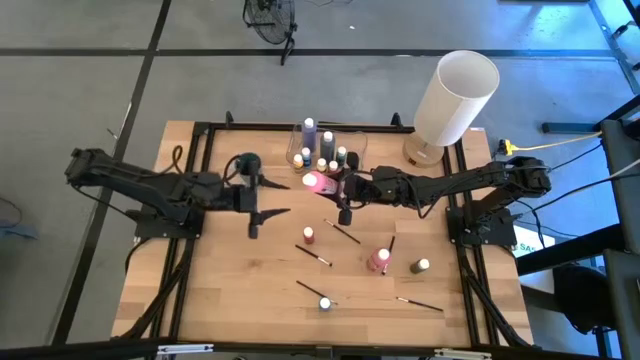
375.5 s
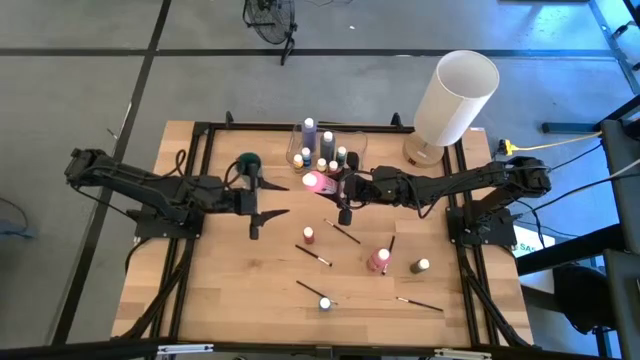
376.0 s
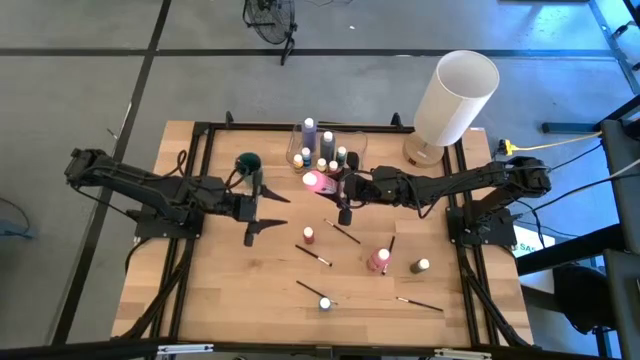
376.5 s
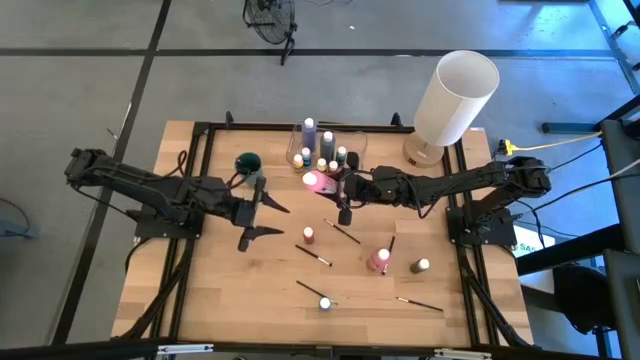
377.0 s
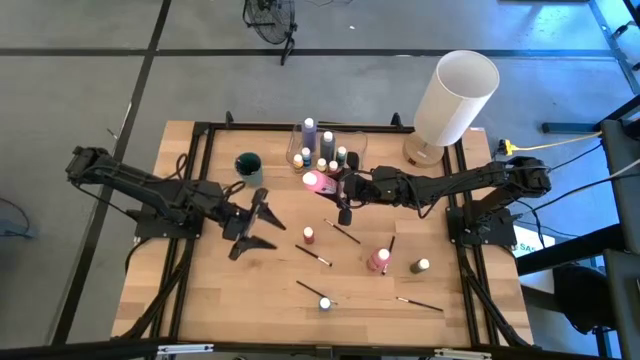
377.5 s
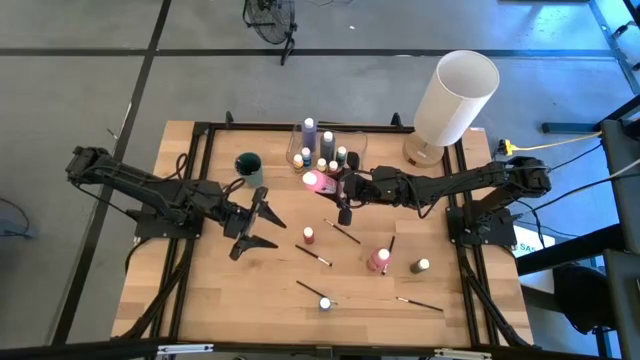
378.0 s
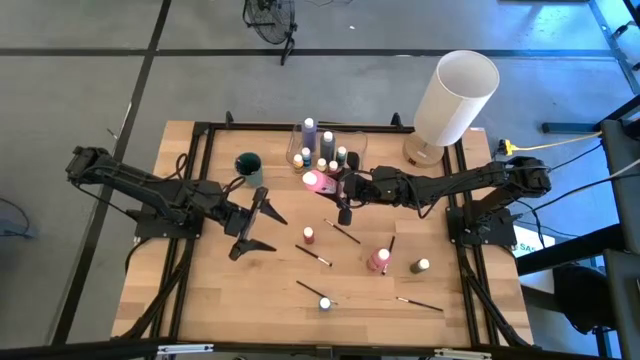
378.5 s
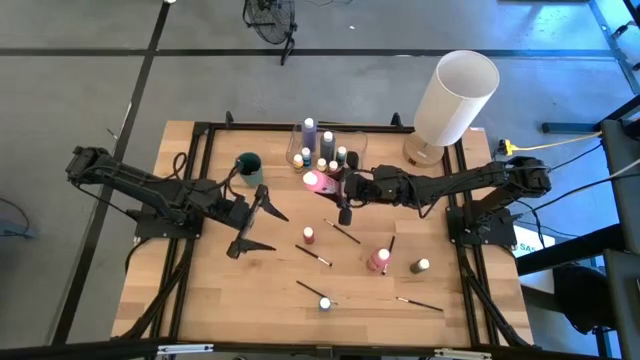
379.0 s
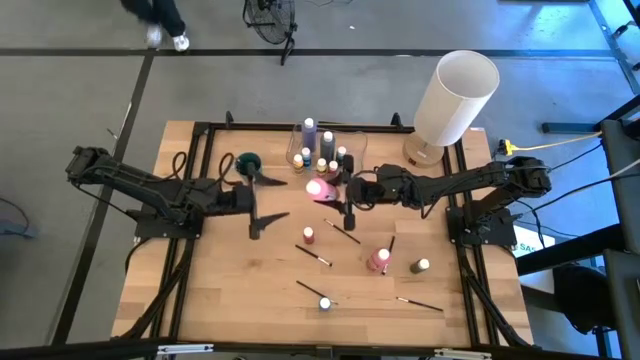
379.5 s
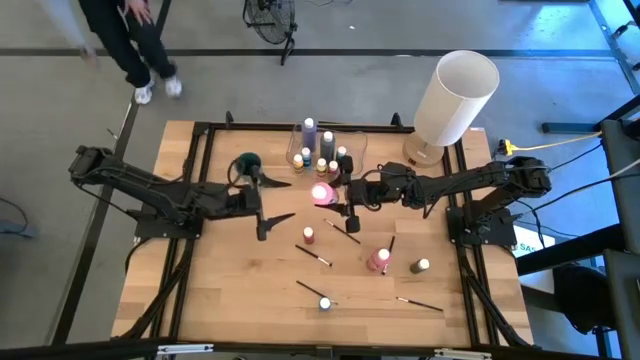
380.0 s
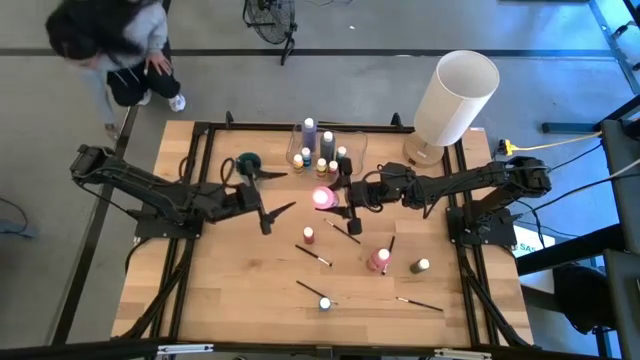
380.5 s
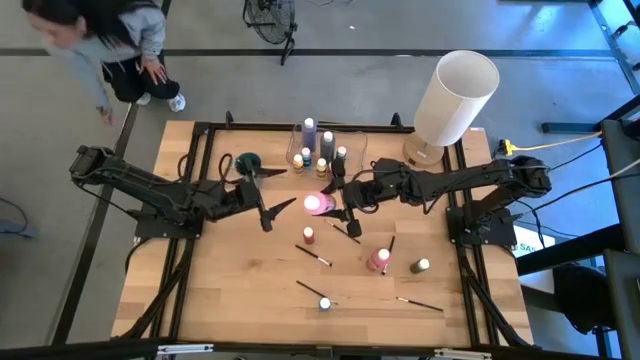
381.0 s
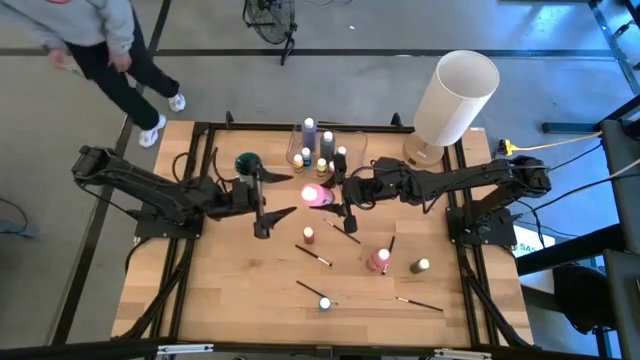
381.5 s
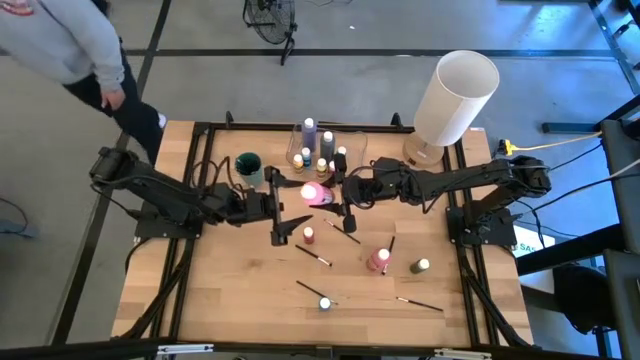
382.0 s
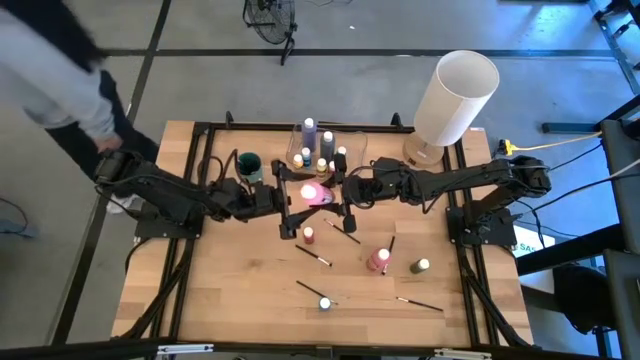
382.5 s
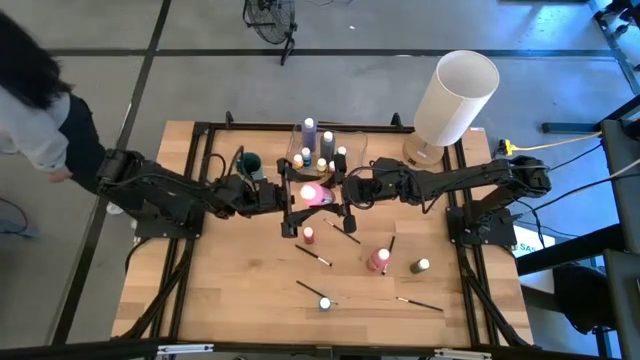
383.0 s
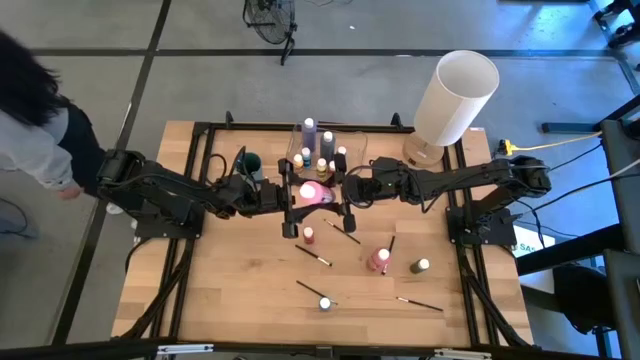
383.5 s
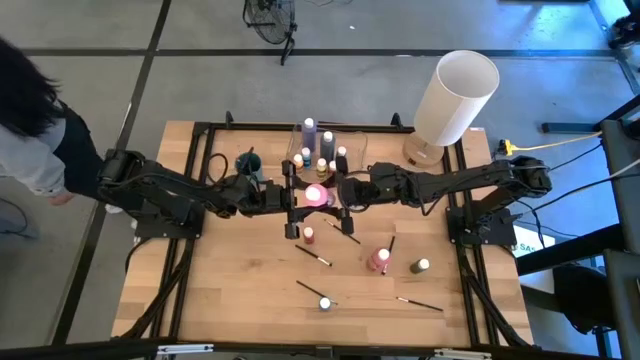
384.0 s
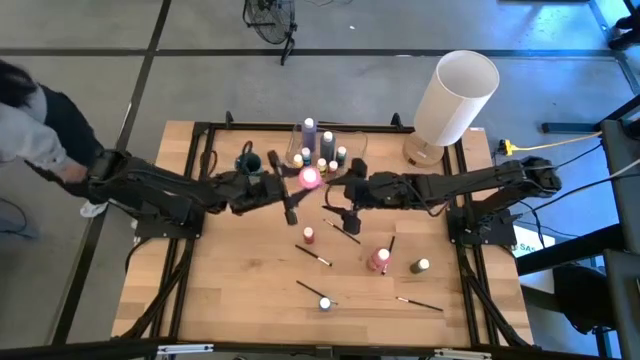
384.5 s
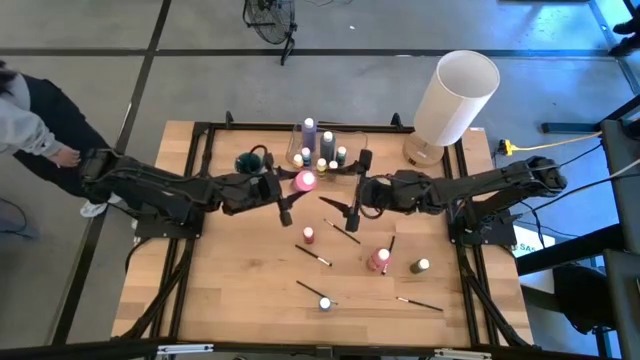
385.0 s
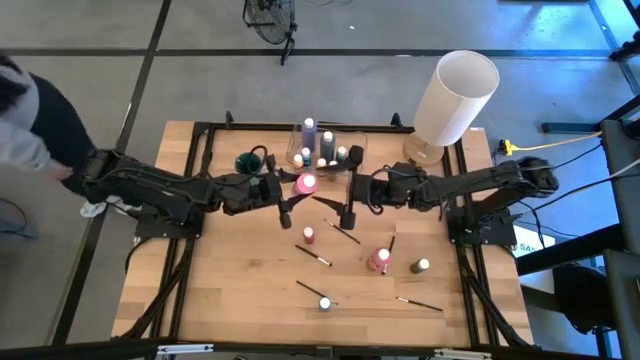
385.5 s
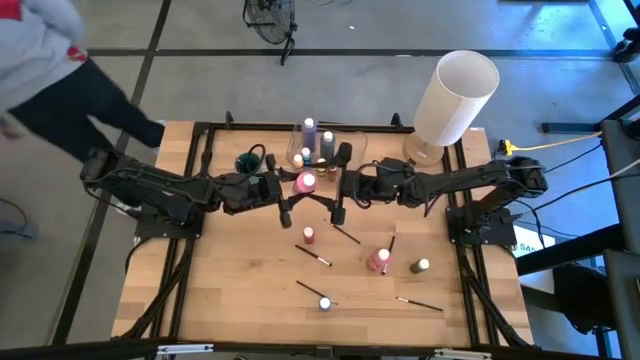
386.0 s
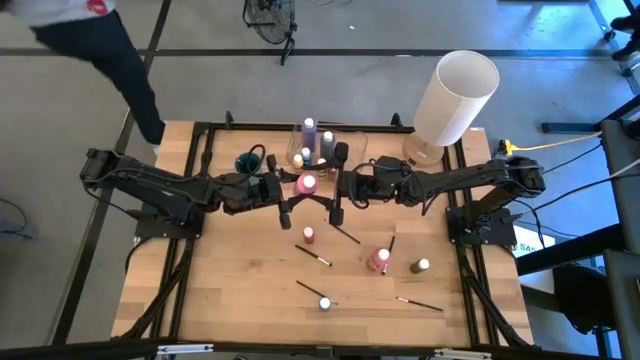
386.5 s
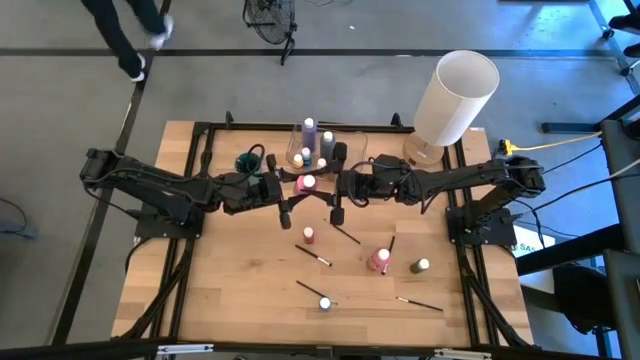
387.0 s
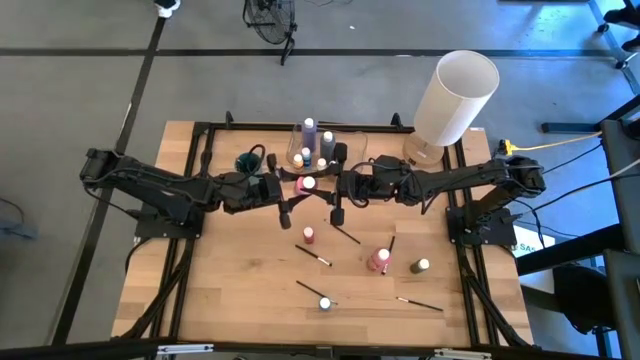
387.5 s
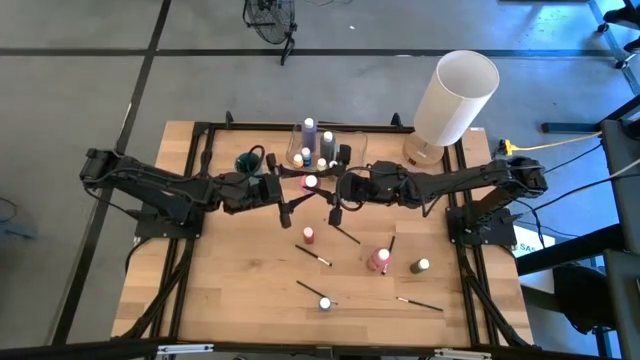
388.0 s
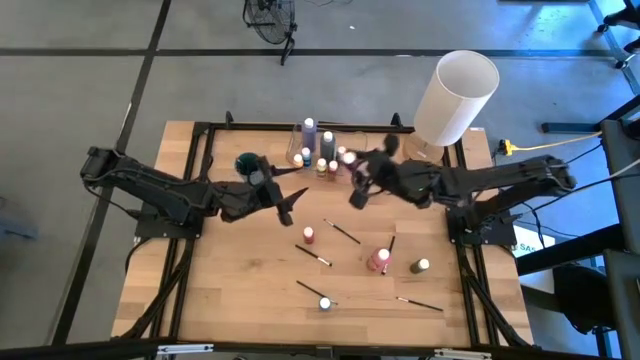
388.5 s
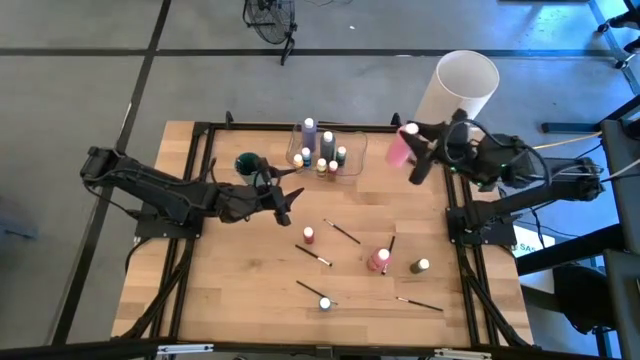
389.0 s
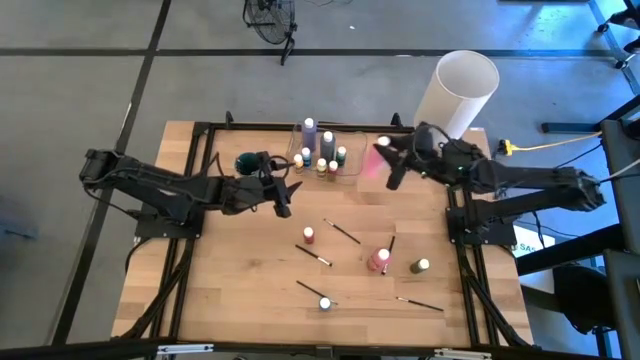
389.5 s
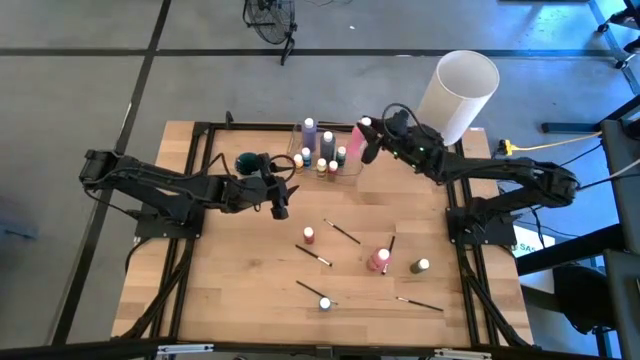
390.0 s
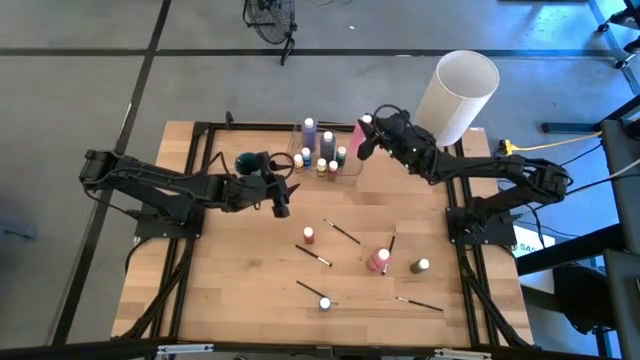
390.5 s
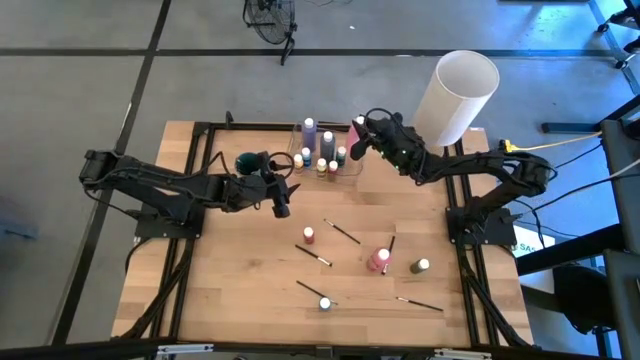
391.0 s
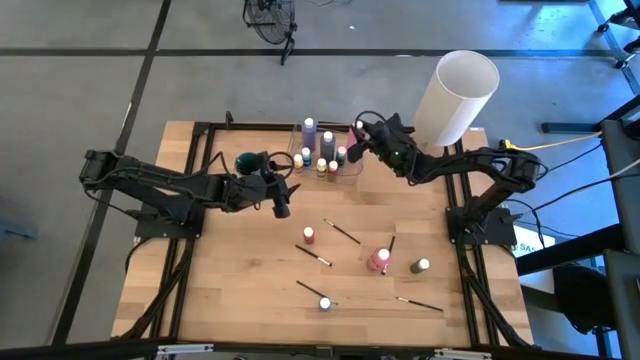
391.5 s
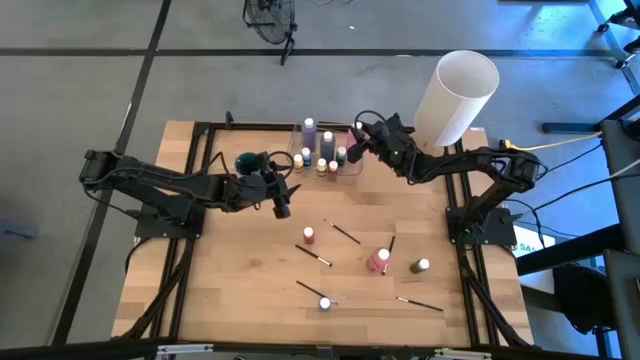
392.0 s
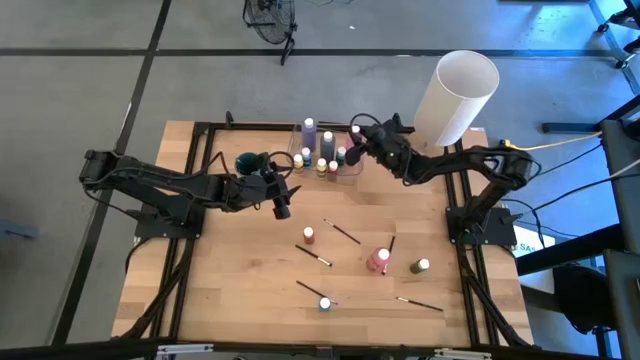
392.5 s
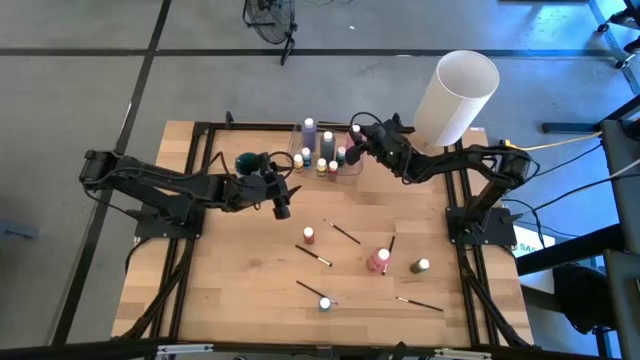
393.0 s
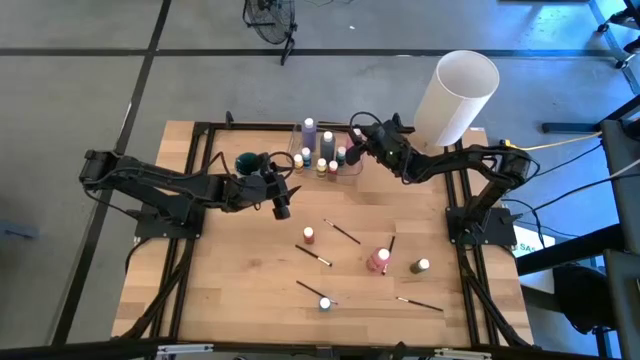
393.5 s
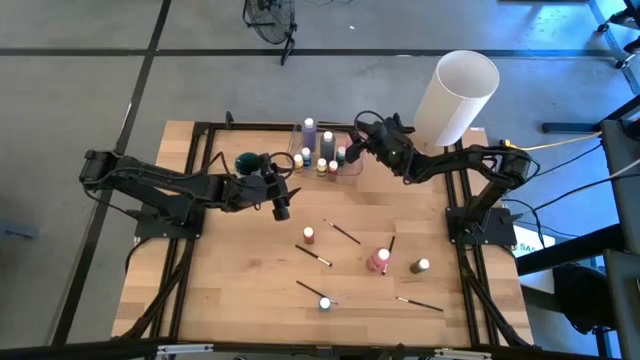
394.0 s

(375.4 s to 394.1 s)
Task: Pick & Place Paint Supplies
Put the pink paint bottle into the transparent bin

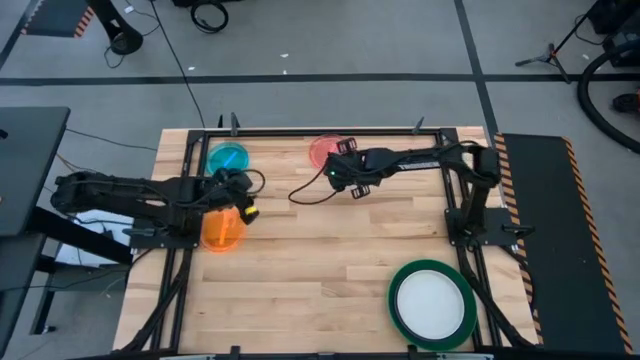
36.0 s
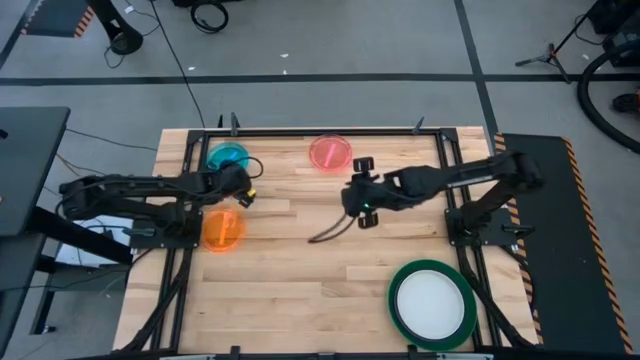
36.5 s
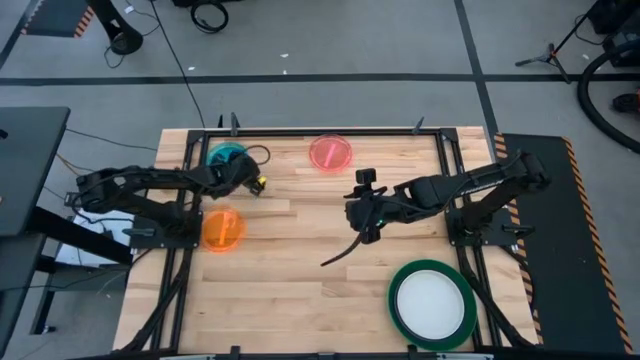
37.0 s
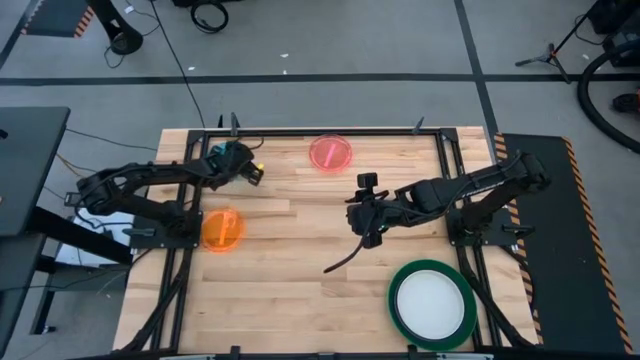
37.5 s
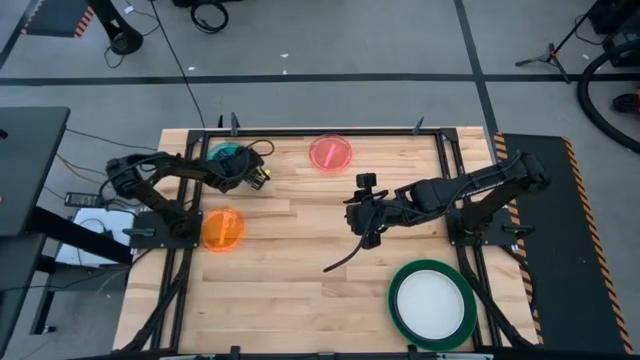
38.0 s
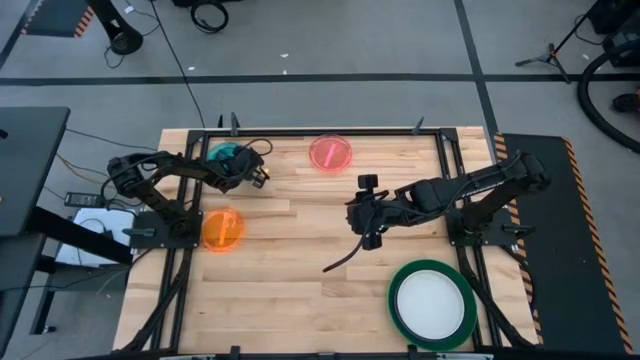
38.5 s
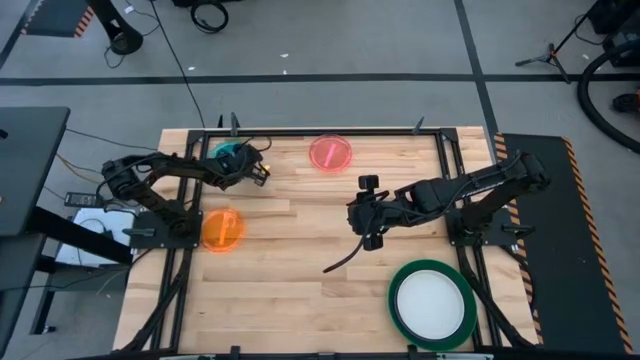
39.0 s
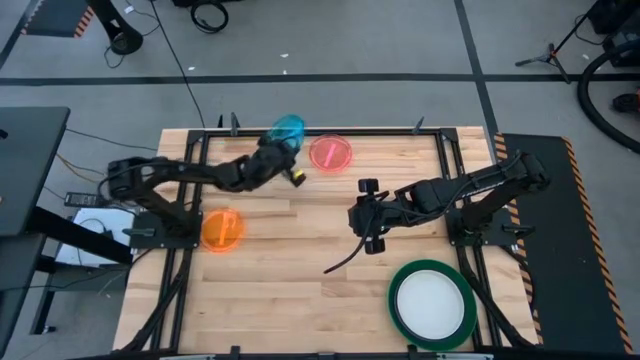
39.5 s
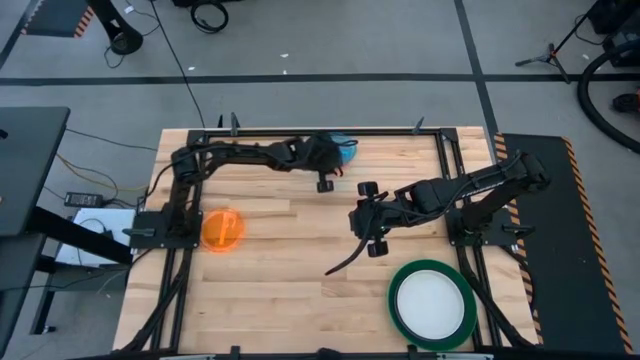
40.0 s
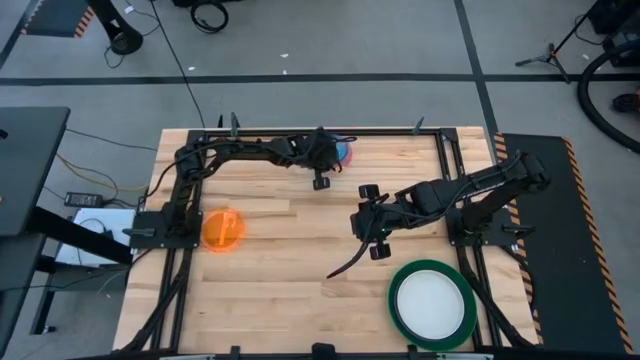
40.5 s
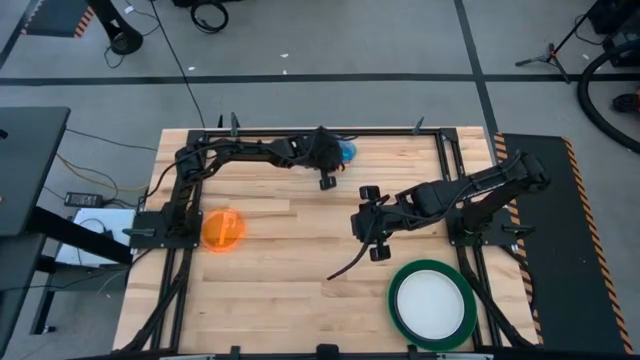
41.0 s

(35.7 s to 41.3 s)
Task: Stack plastic plates
Stack the blue transparent plate on top of the pink transparent plate
